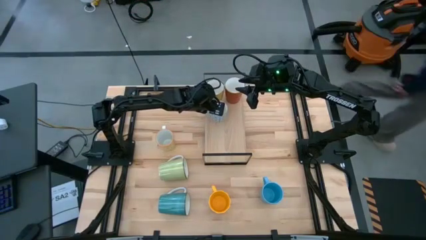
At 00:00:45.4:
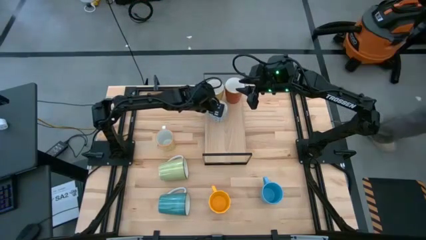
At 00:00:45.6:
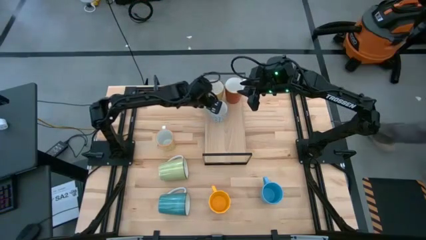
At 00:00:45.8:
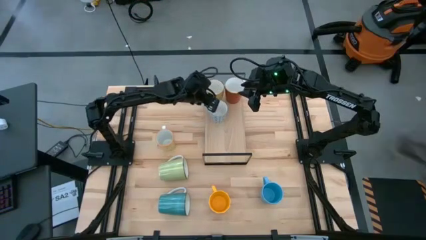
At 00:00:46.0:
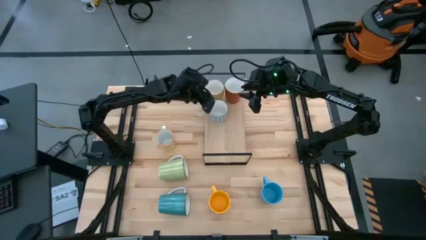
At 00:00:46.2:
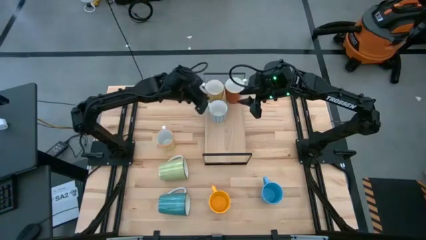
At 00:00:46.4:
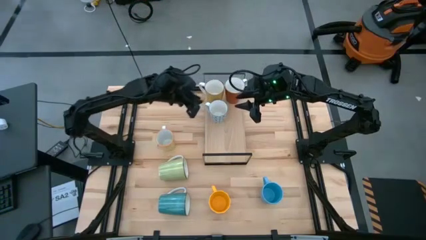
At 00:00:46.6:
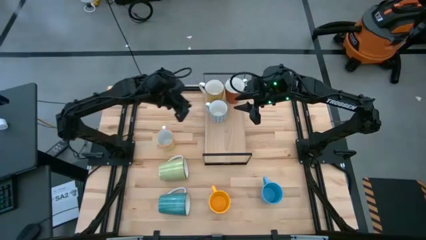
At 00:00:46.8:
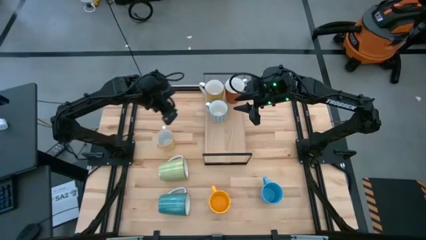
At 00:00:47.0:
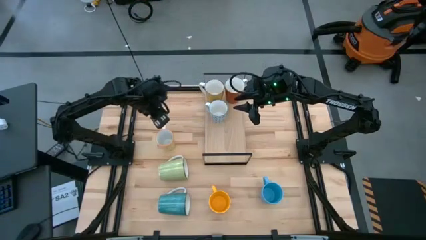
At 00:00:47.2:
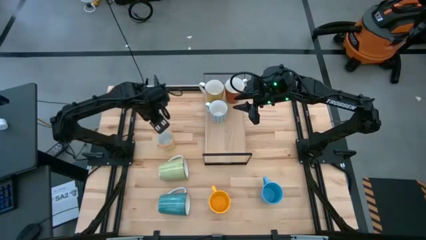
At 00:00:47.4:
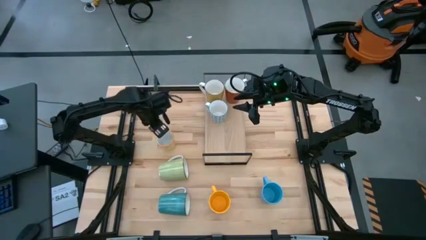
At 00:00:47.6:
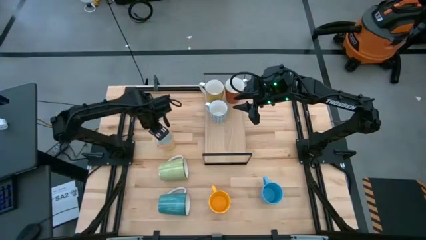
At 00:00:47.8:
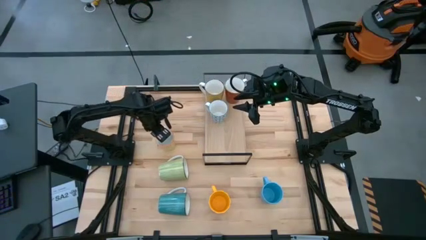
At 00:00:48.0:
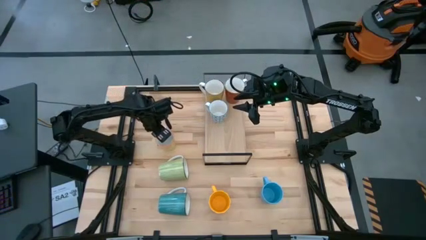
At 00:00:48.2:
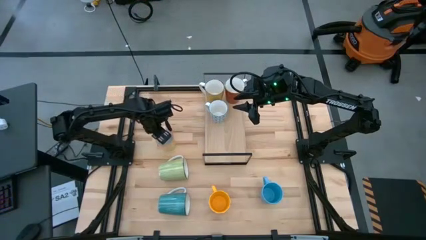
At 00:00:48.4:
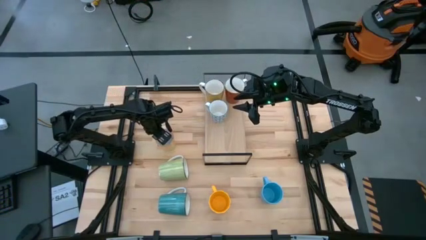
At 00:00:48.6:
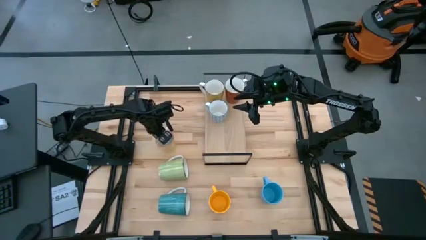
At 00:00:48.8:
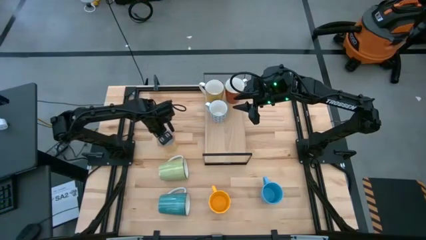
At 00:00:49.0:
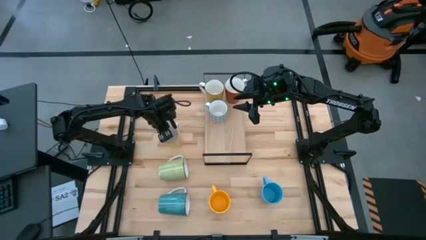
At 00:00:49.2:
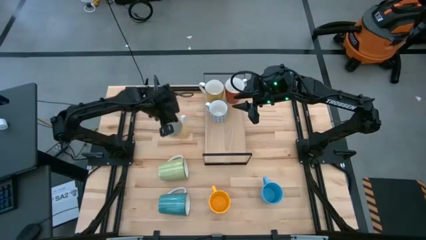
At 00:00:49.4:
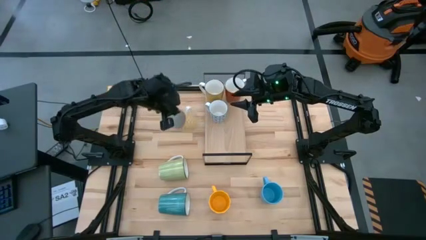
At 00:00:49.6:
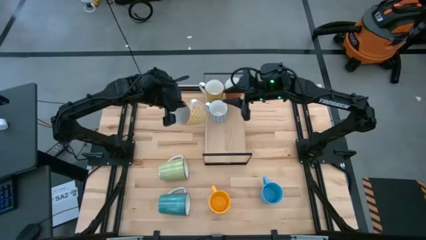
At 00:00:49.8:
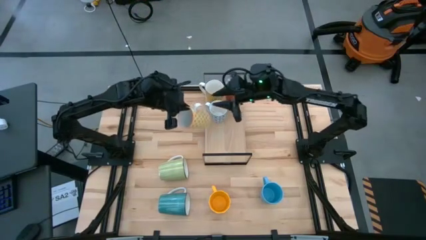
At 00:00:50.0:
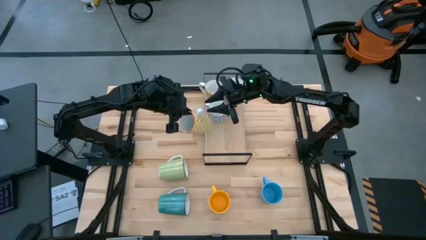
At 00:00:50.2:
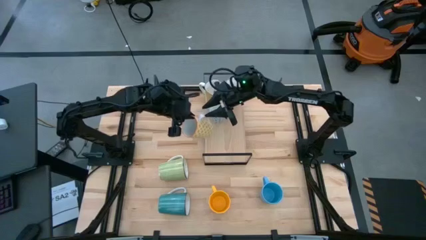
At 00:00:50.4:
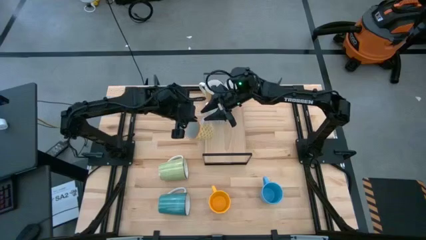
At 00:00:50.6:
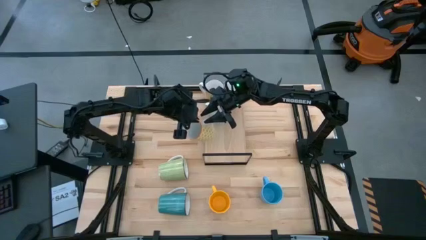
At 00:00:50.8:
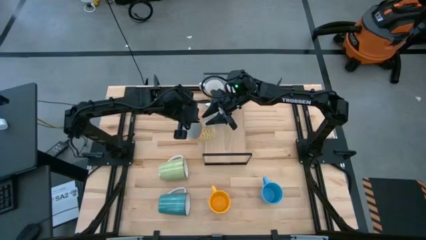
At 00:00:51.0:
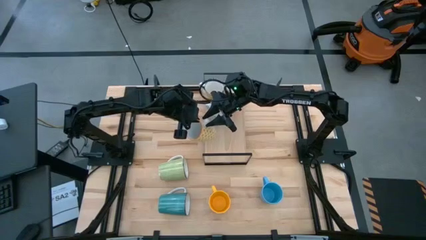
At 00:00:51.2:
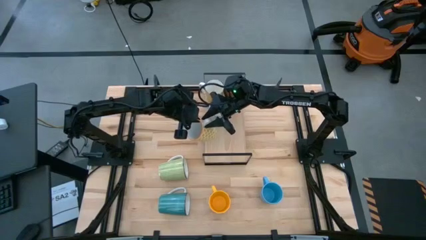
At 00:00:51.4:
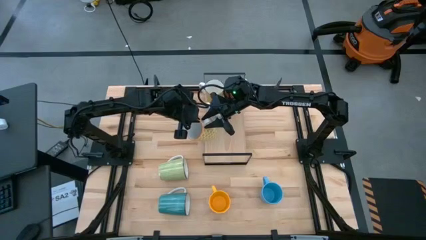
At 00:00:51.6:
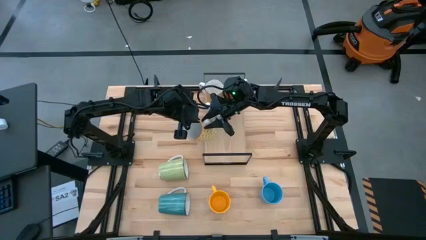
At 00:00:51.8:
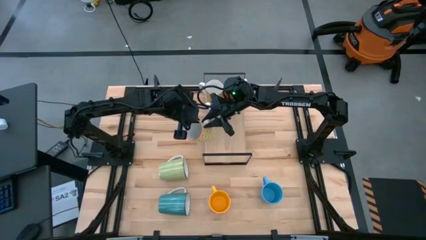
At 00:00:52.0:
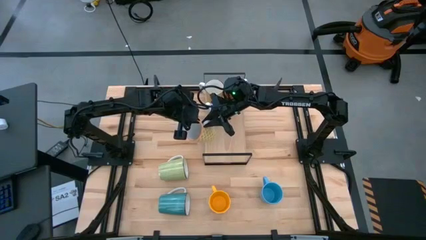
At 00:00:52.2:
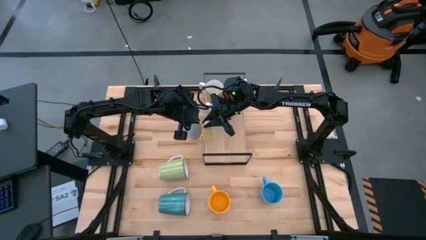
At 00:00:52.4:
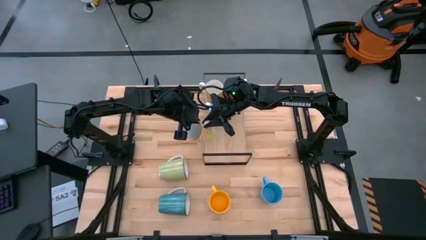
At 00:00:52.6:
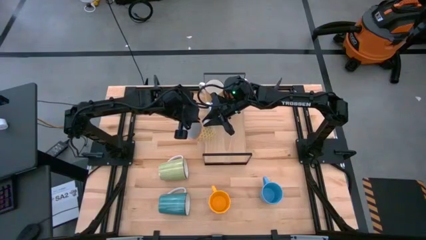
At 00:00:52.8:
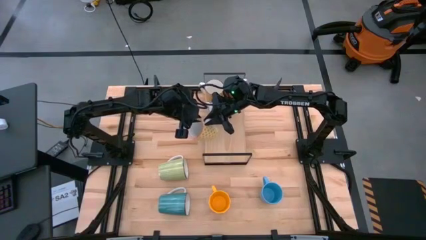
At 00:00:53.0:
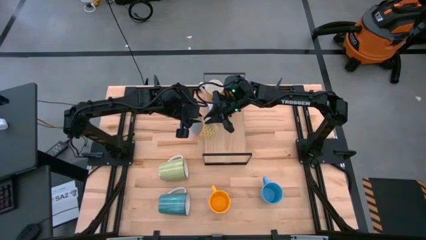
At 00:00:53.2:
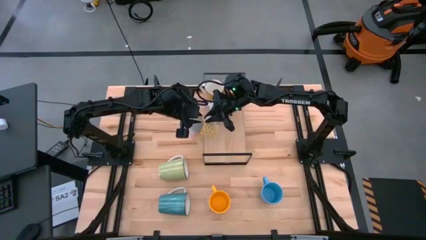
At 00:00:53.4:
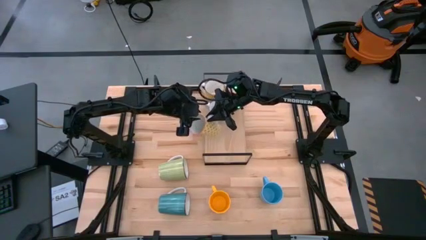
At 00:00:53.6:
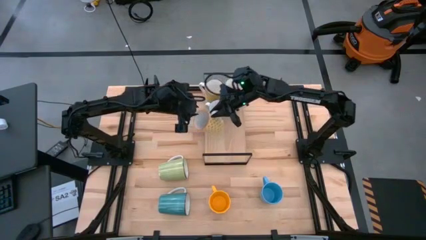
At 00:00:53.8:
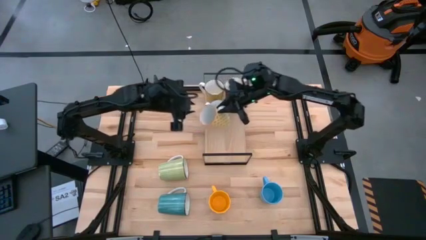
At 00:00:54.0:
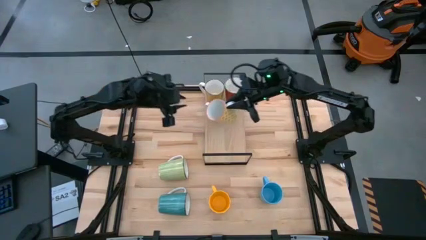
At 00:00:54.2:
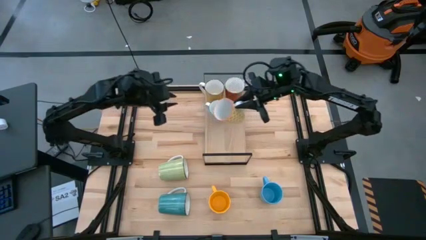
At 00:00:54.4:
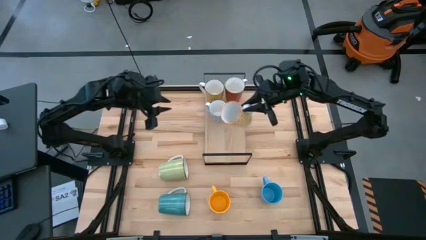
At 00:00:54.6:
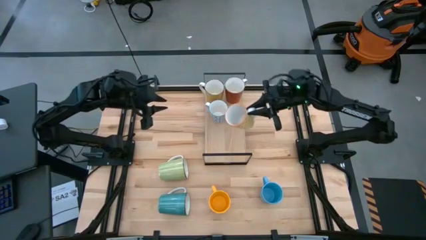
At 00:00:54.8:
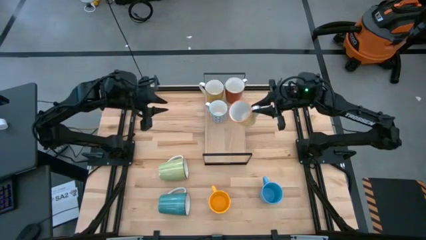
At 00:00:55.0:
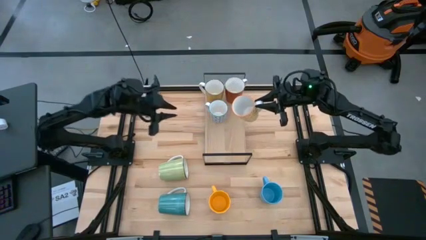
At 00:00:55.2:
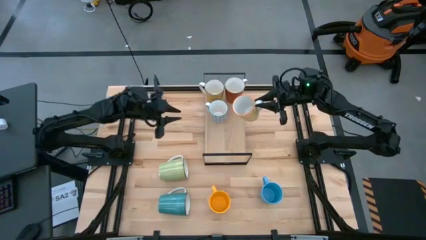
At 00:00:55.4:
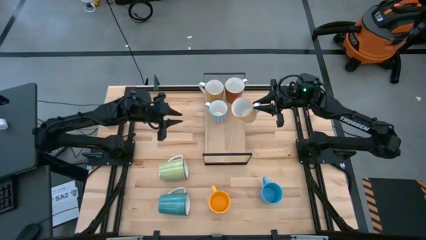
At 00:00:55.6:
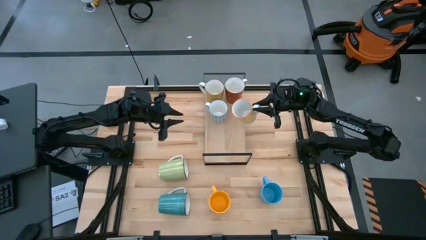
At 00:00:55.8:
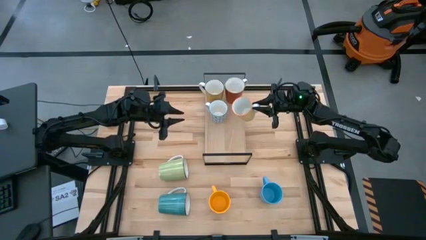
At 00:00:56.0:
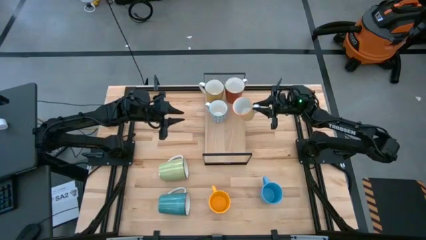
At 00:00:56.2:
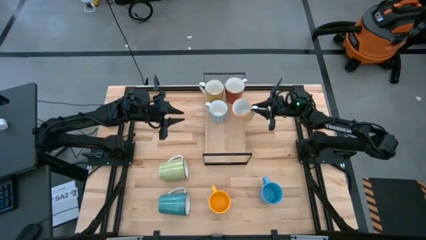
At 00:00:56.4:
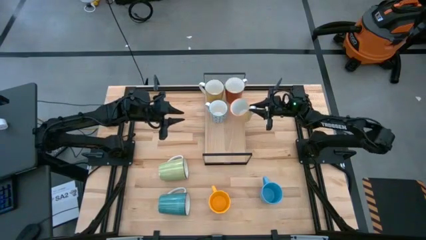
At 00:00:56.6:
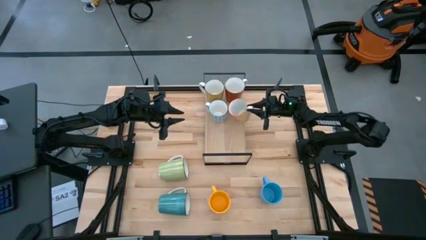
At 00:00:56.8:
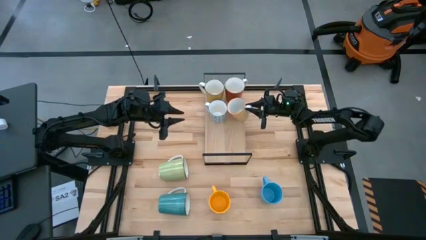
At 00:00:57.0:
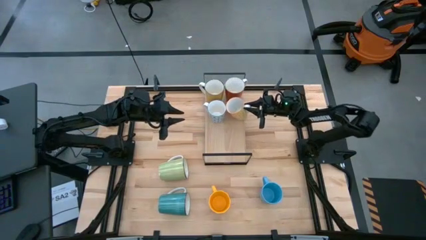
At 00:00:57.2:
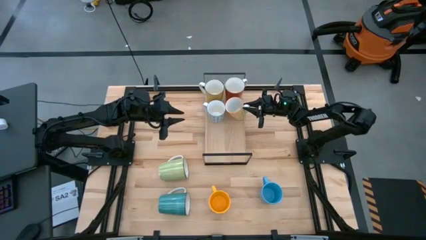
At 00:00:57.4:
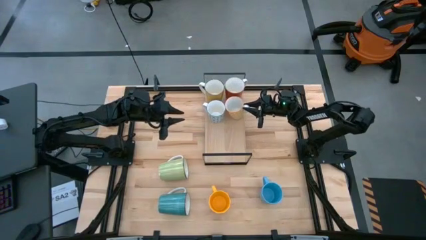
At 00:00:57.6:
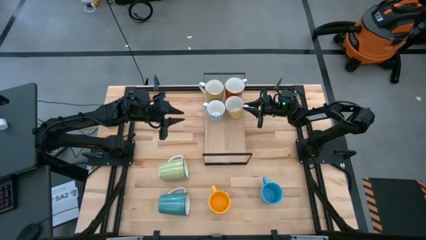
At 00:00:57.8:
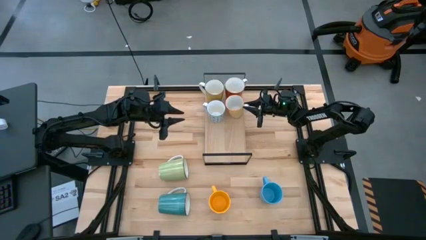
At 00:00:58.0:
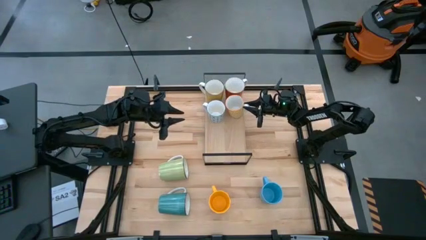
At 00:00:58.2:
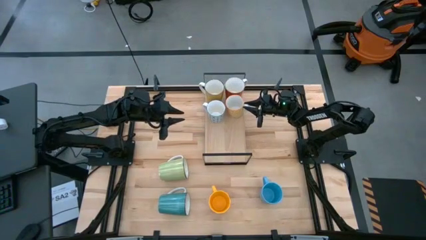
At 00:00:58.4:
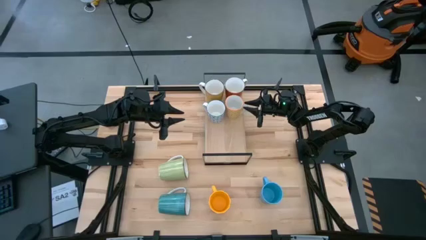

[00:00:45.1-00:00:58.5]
Task: Place coffee mugs
Put the yellow patterned mug on the shelf
